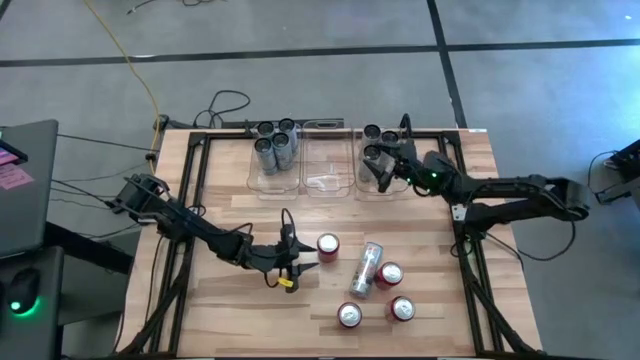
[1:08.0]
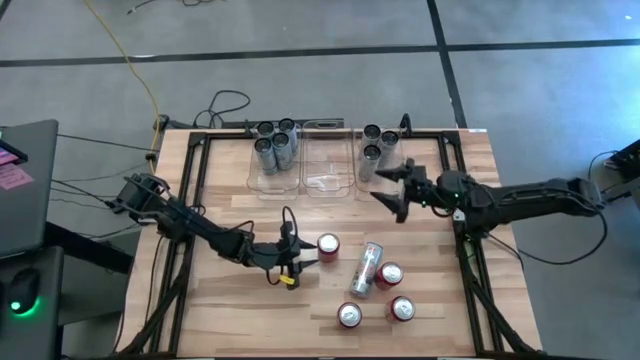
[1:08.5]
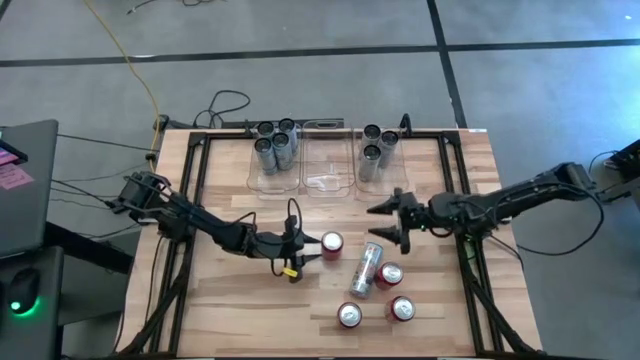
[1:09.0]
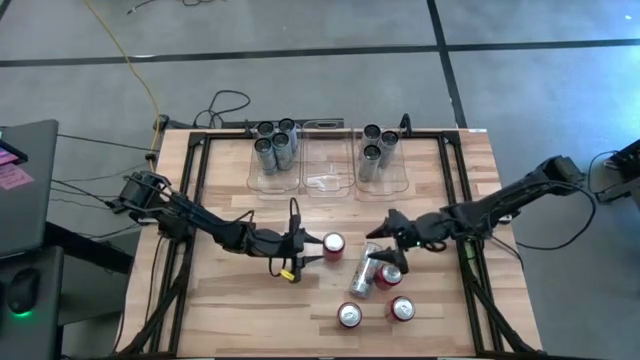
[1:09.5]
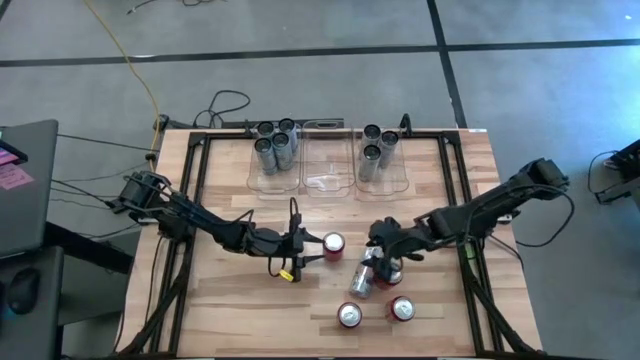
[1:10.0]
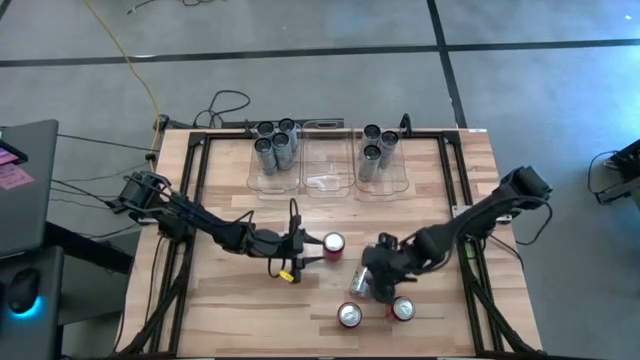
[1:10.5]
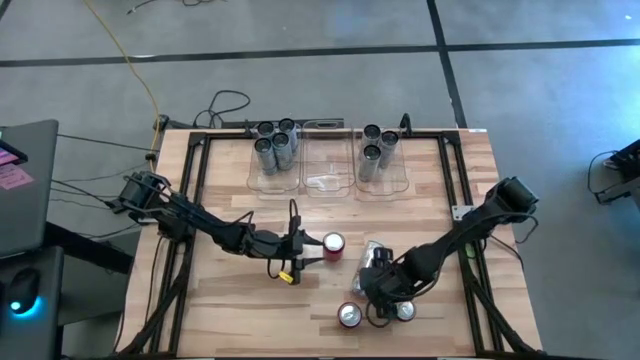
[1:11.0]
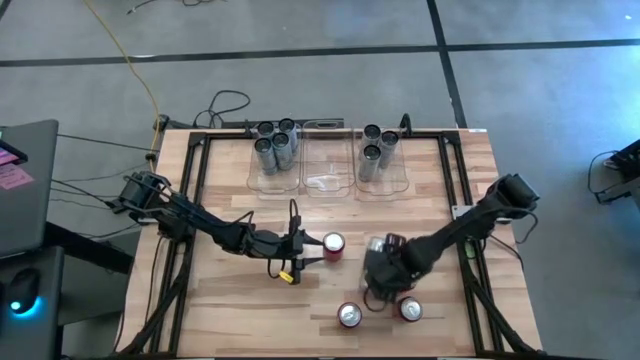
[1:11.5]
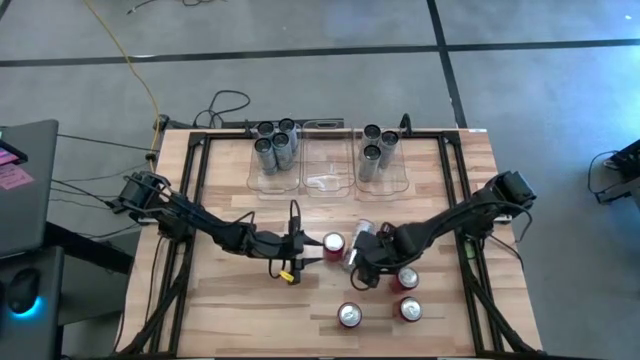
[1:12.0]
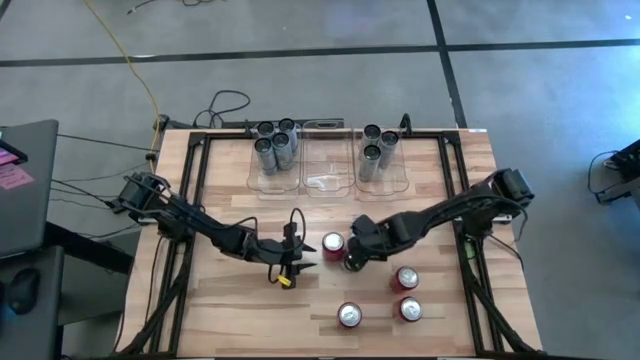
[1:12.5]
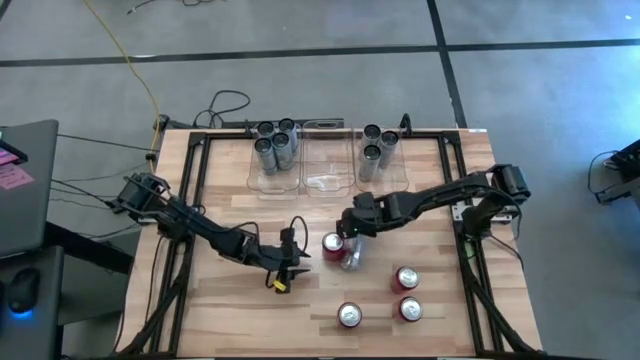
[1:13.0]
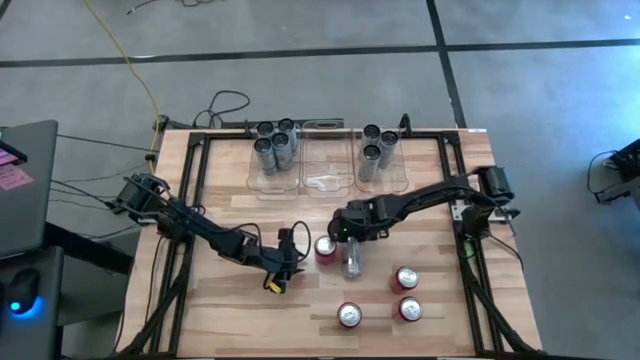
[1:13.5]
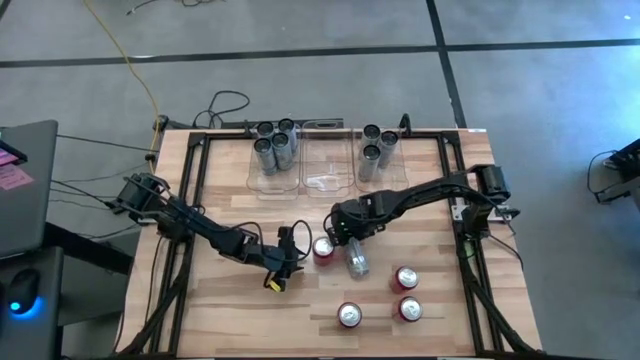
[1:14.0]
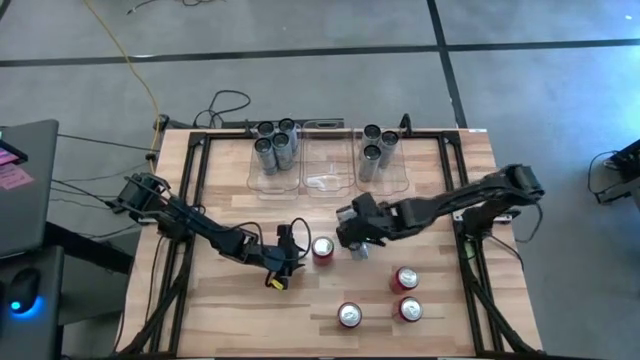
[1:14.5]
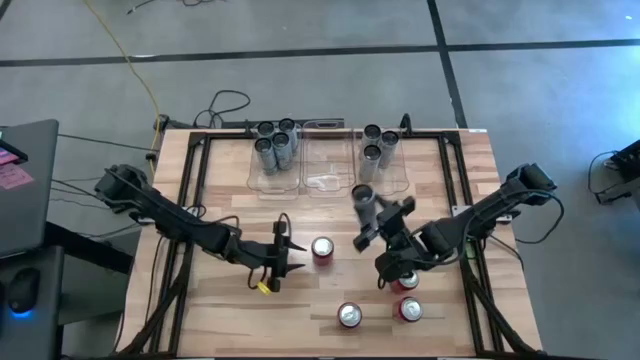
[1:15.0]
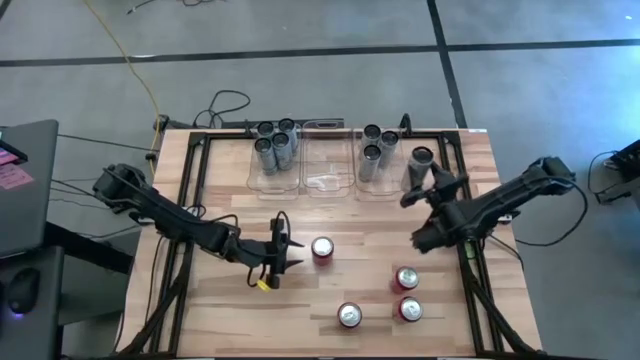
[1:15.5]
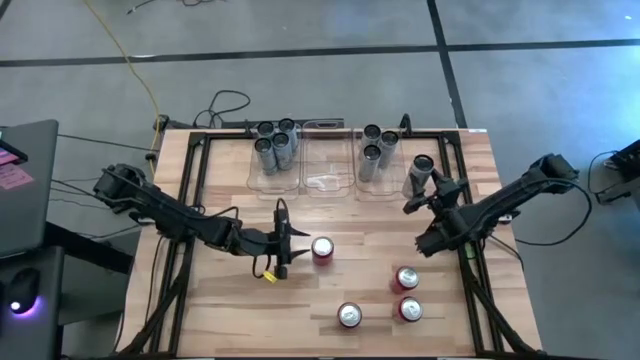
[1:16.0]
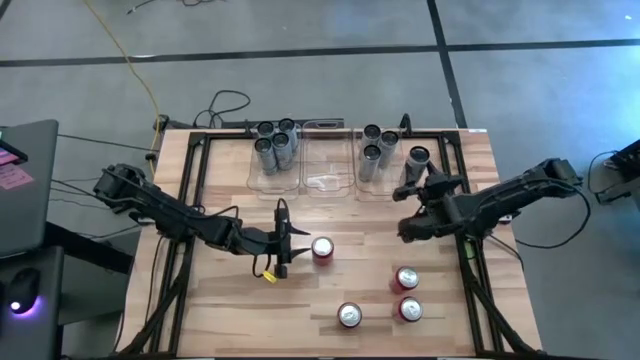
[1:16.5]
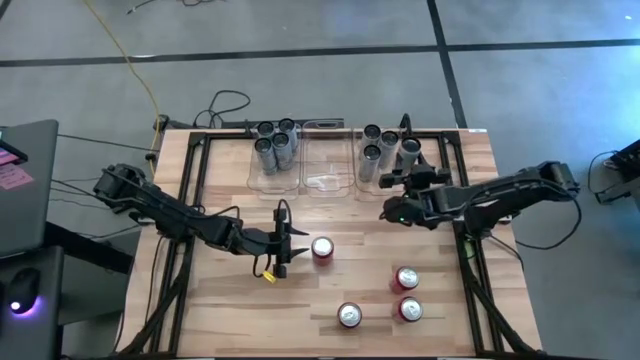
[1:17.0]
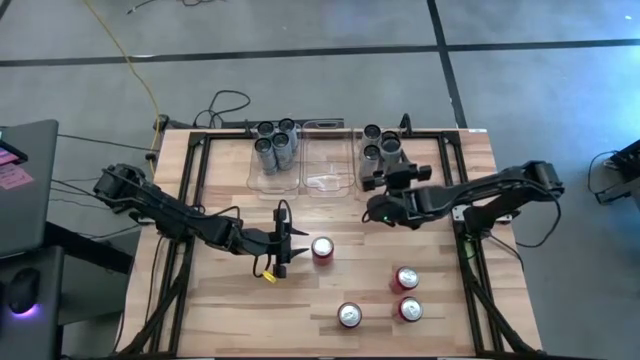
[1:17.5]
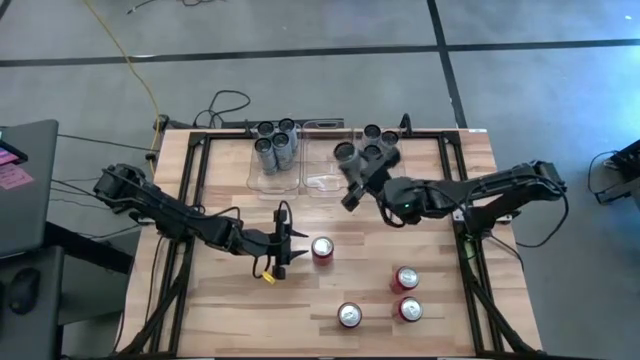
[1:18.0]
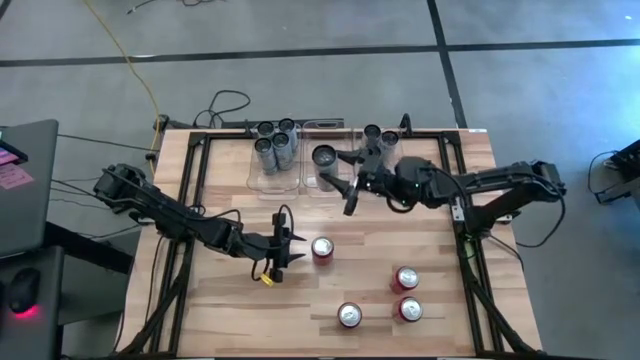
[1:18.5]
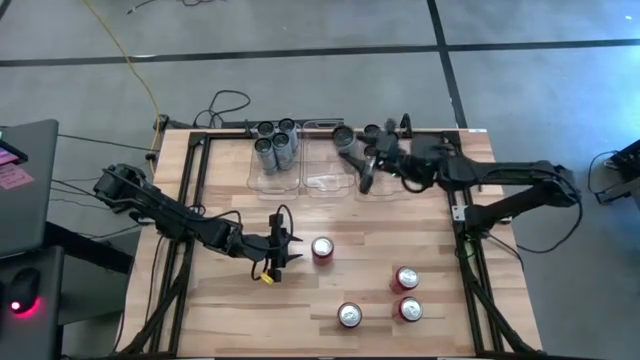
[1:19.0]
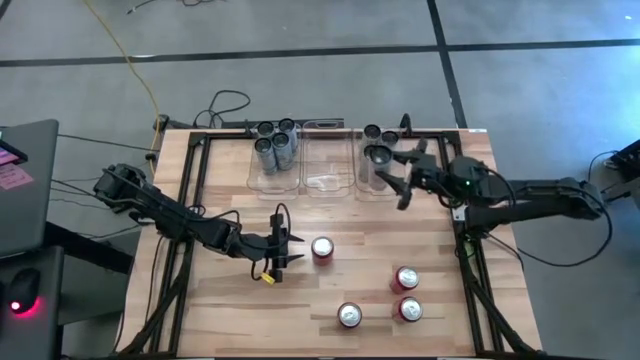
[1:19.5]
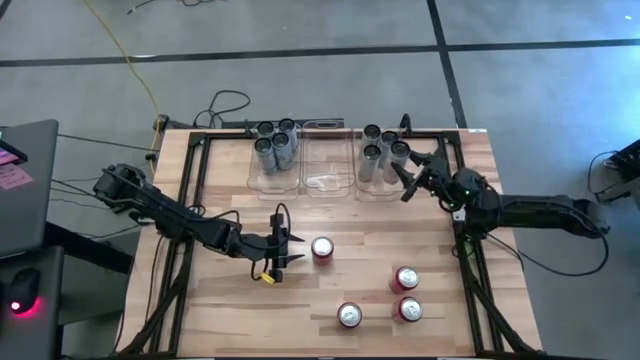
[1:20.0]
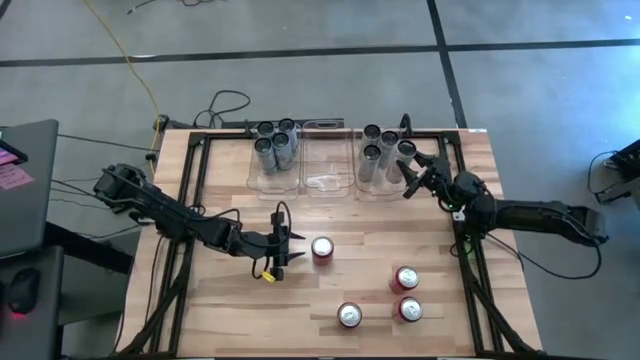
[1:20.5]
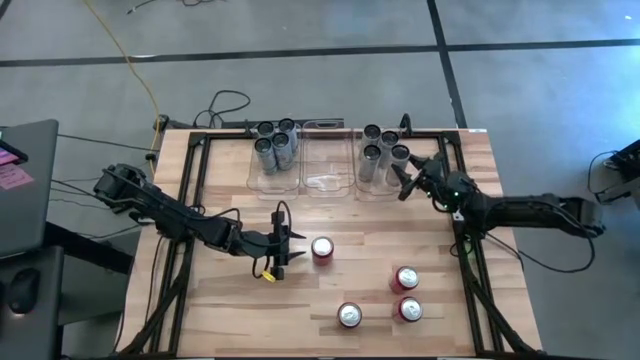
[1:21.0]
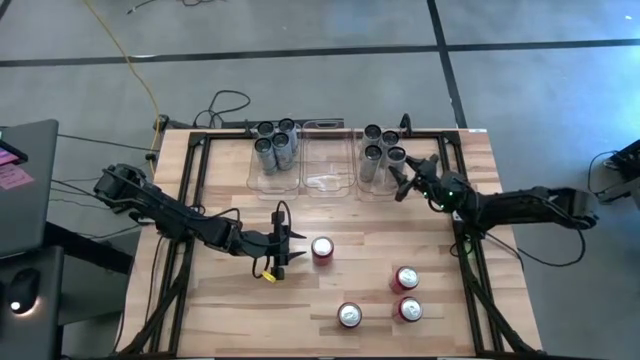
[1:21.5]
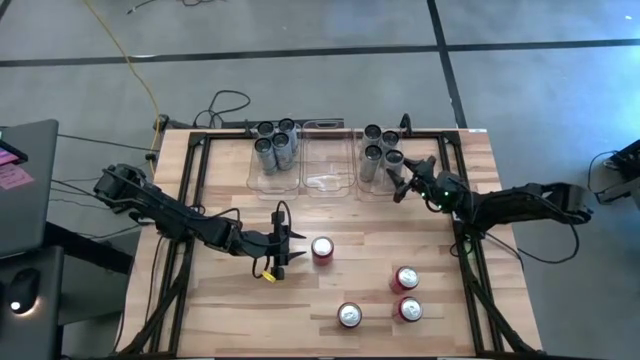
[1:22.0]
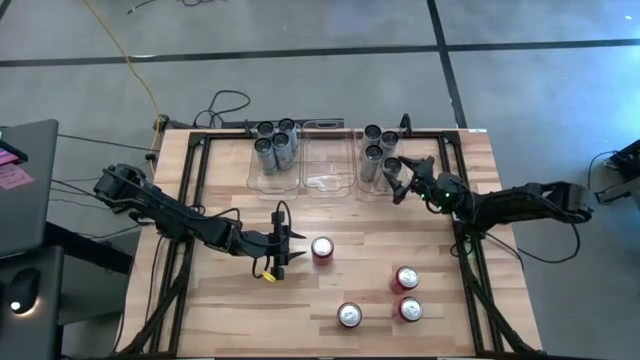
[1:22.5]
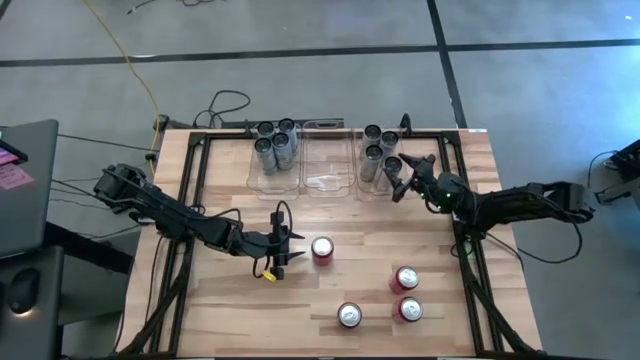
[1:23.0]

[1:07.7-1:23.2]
Task: Sort soda cans
Put the white-yellow soda can into the right transparent bin

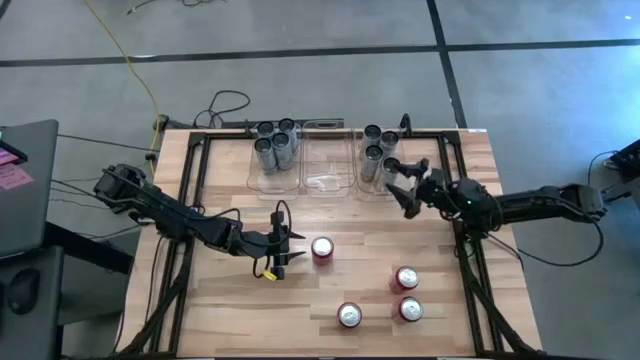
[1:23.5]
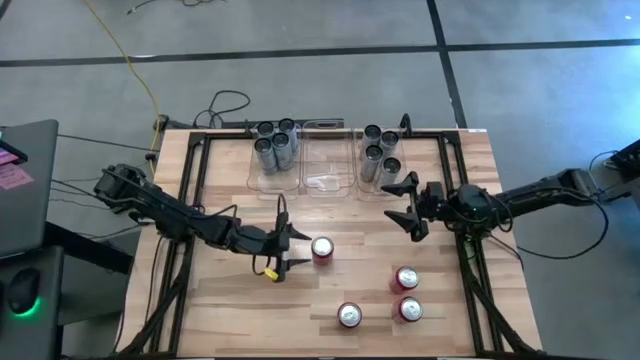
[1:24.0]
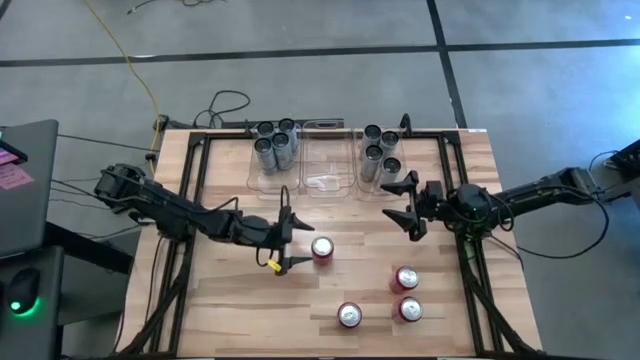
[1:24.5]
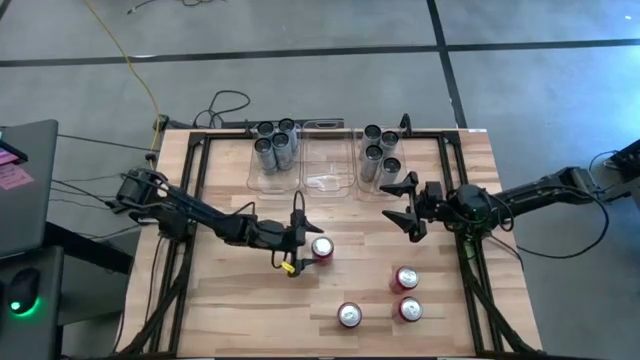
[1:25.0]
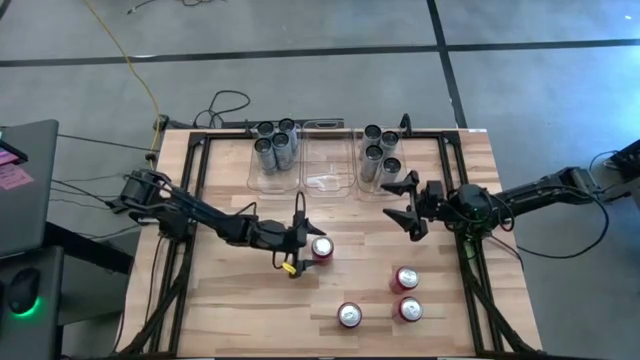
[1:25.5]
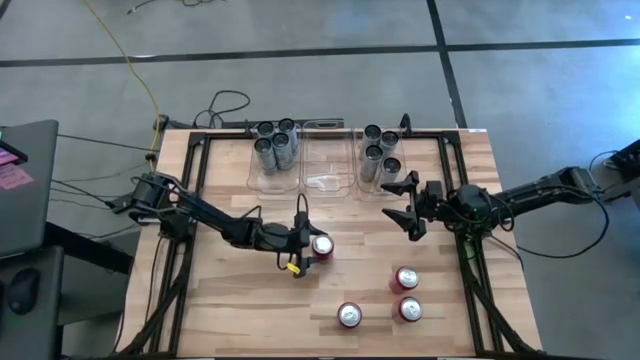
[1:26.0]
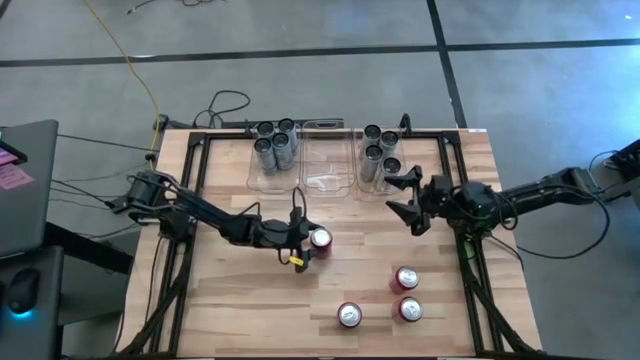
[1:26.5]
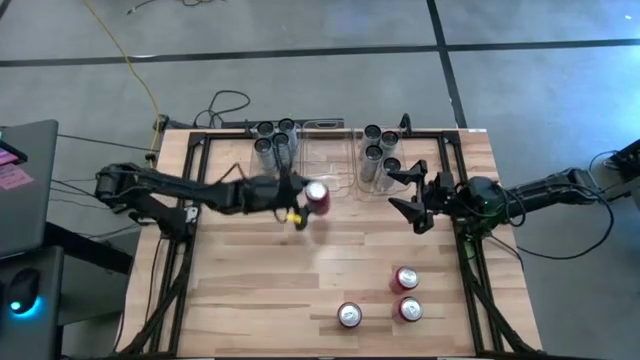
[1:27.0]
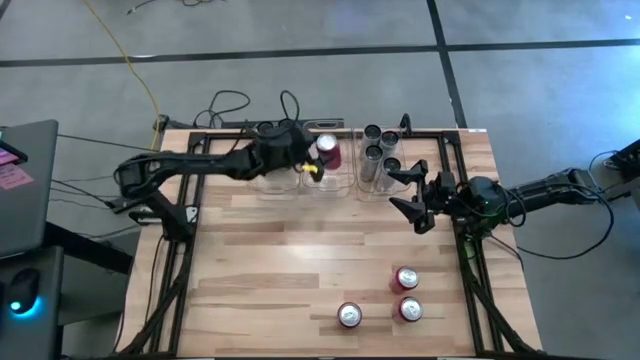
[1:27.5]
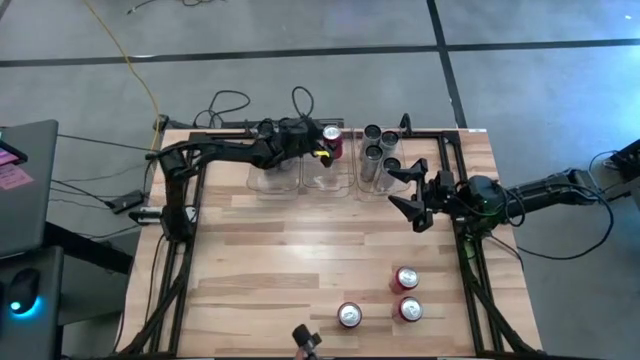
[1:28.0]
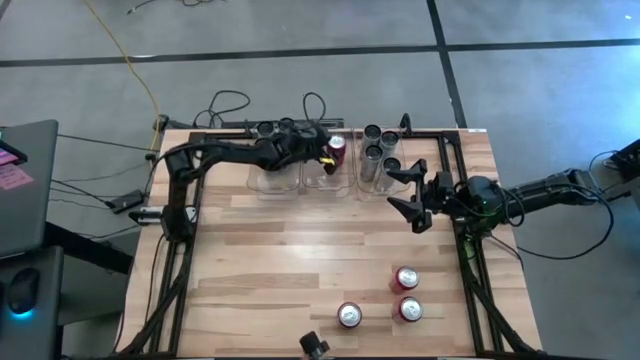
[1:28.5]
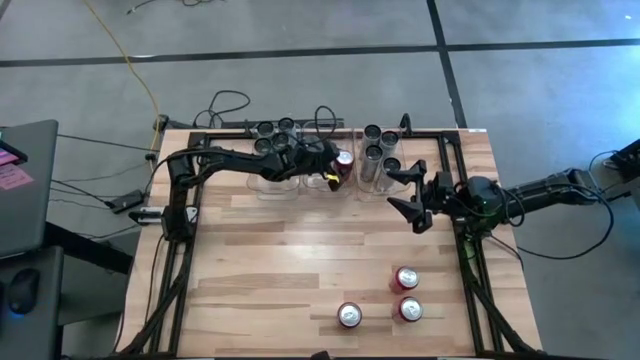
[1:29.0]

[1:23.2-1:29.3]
Put the red-black soda can into the middle transparent bin
